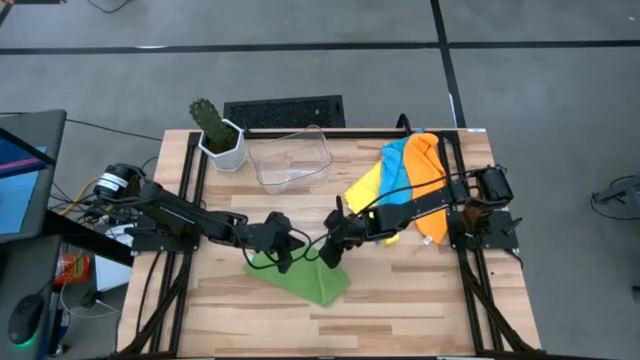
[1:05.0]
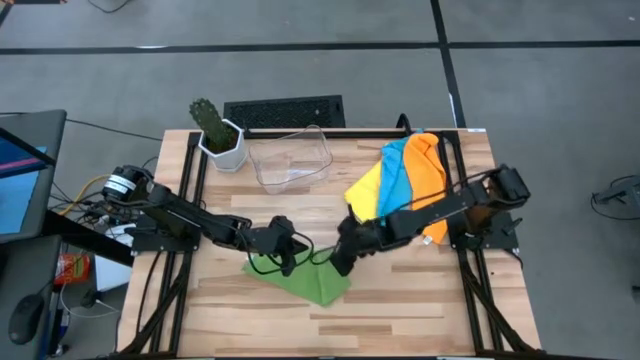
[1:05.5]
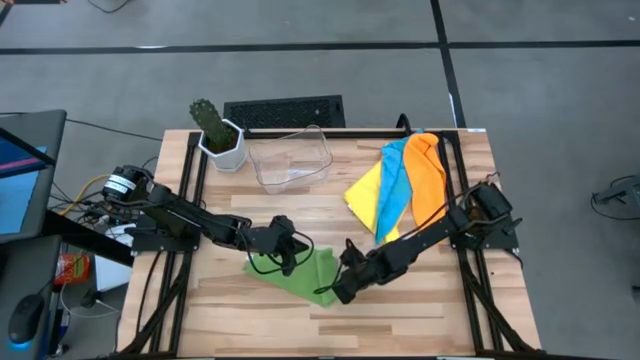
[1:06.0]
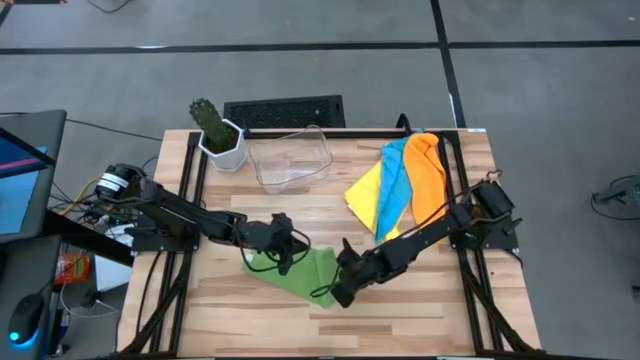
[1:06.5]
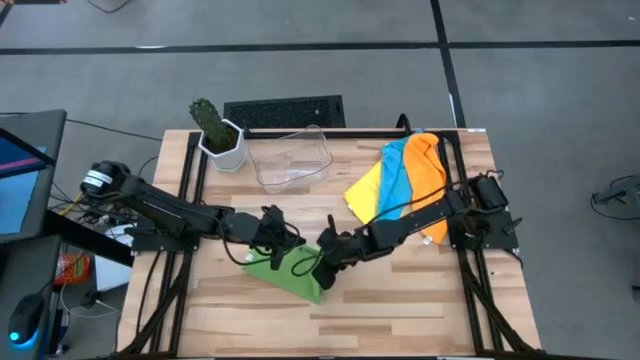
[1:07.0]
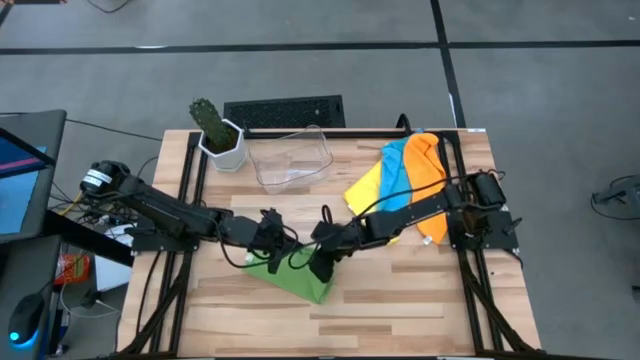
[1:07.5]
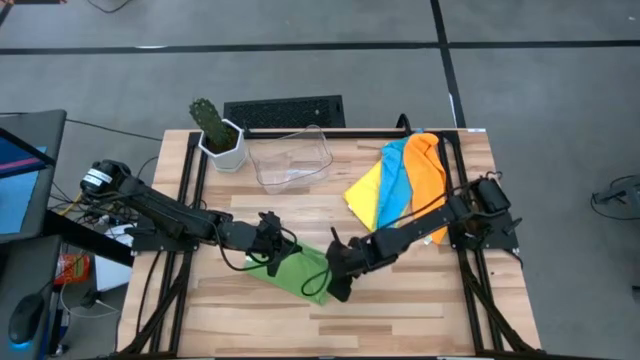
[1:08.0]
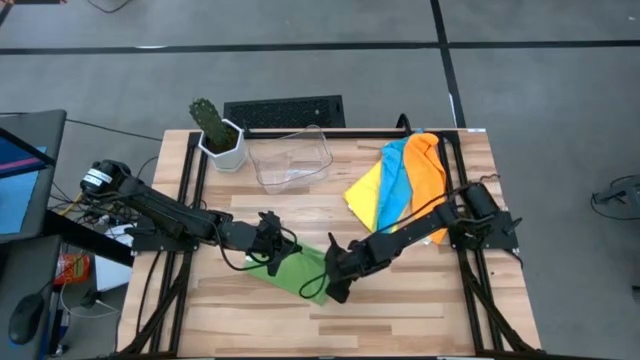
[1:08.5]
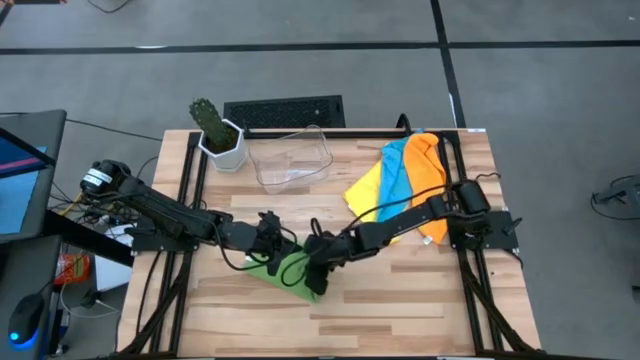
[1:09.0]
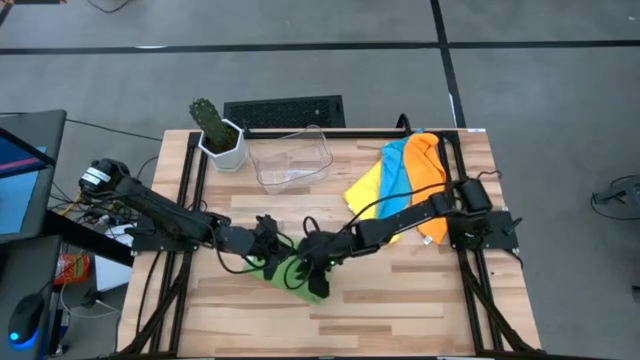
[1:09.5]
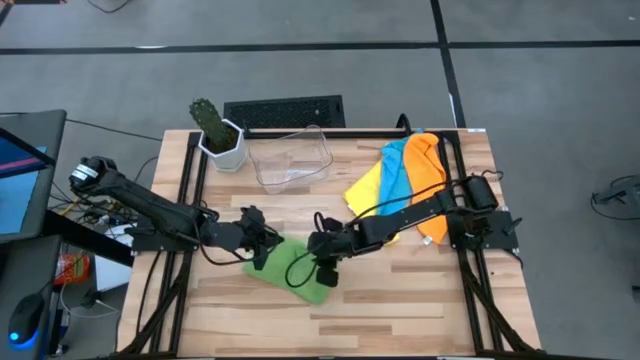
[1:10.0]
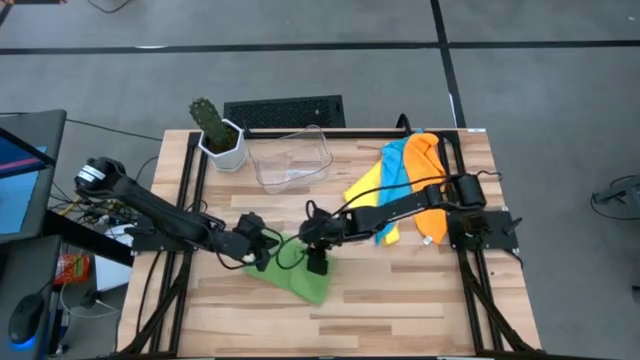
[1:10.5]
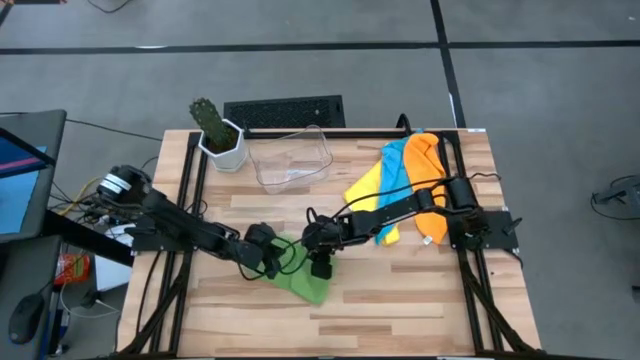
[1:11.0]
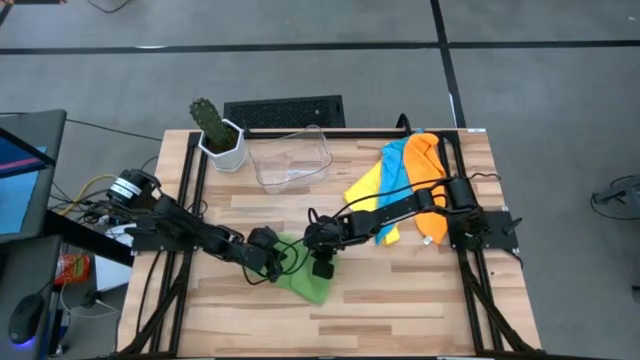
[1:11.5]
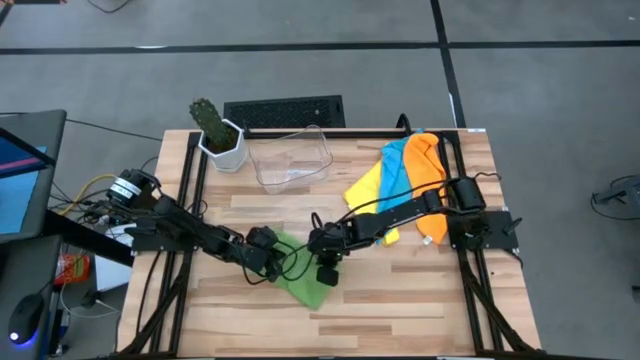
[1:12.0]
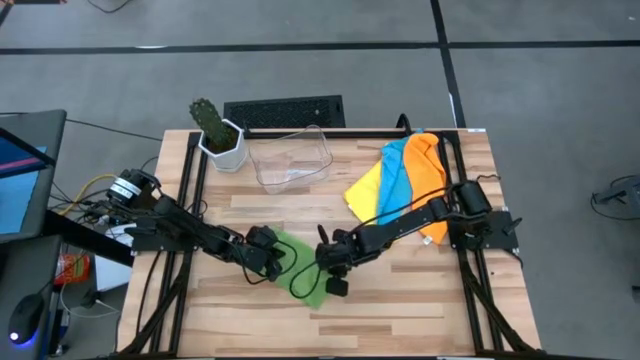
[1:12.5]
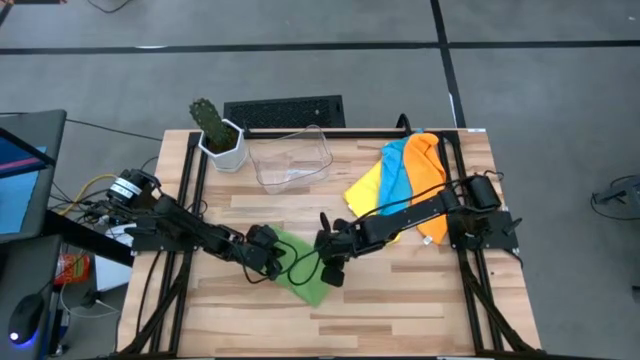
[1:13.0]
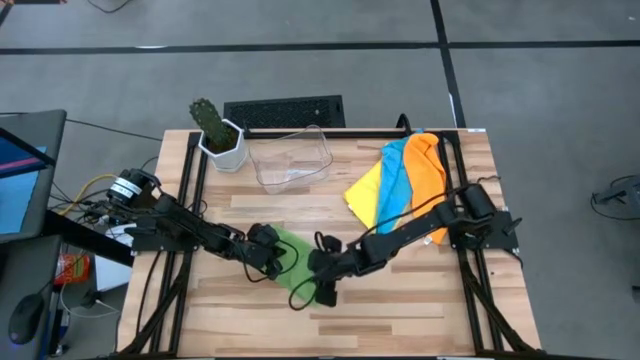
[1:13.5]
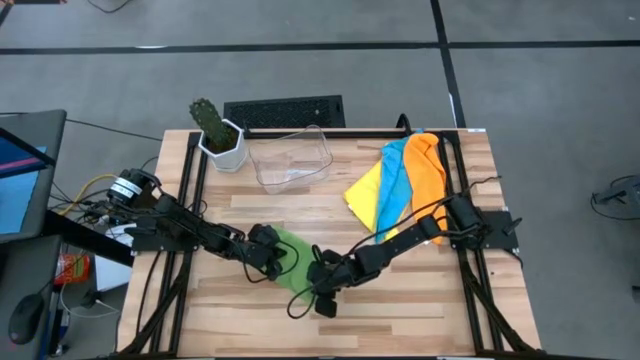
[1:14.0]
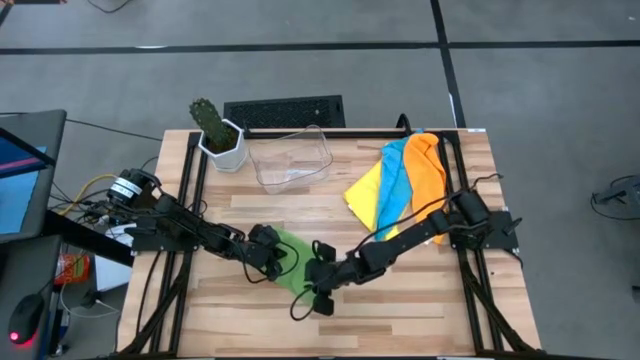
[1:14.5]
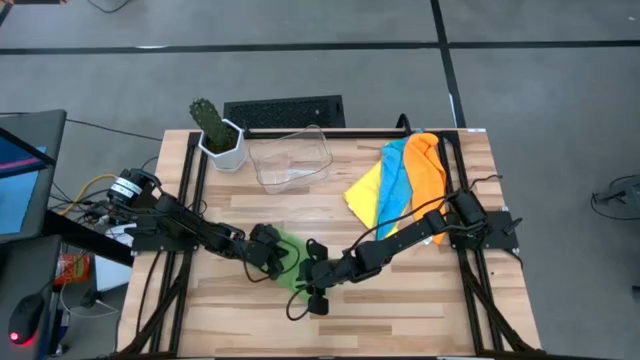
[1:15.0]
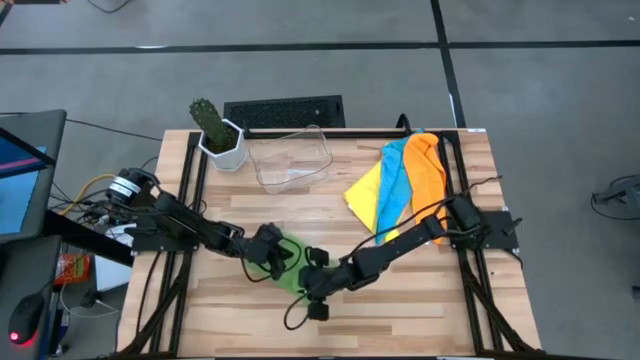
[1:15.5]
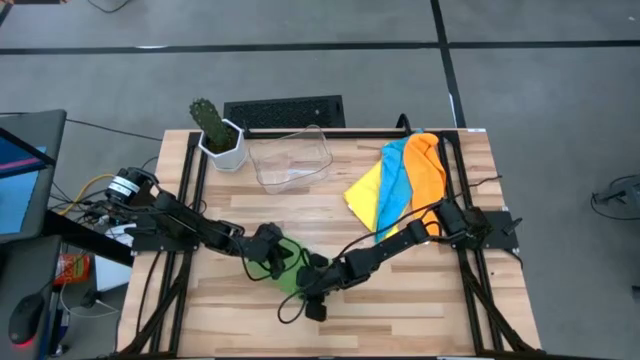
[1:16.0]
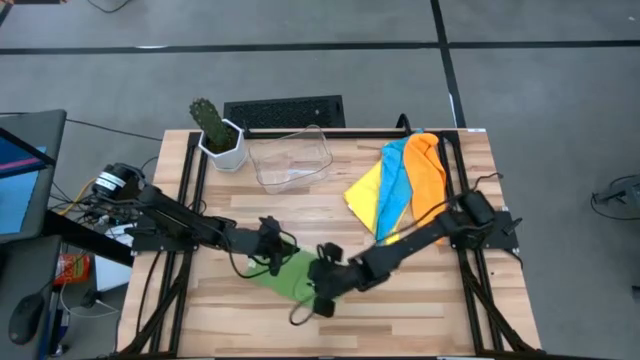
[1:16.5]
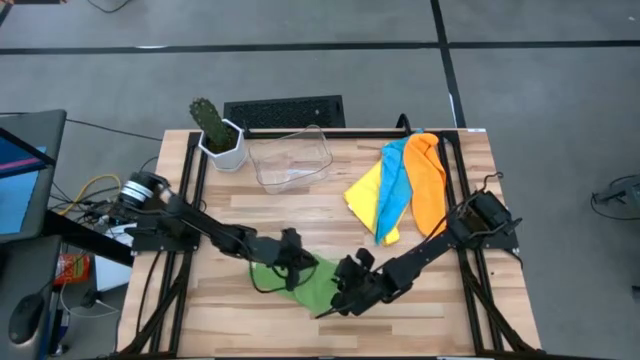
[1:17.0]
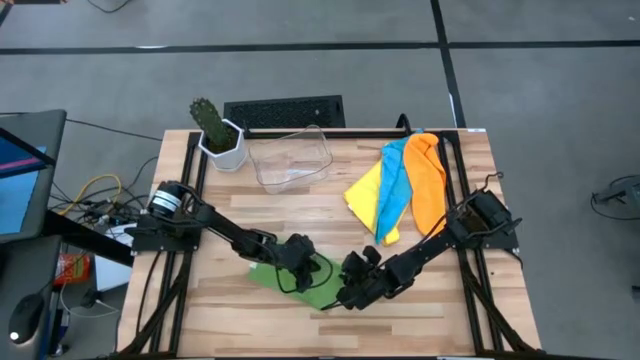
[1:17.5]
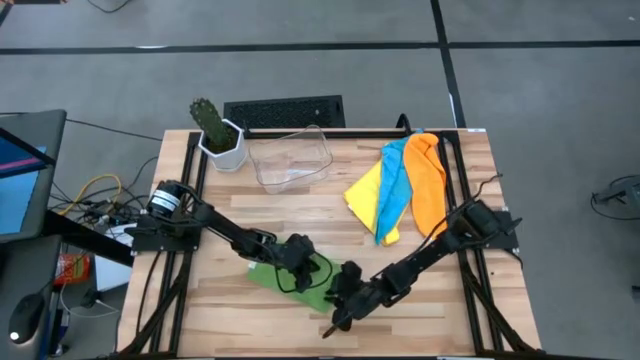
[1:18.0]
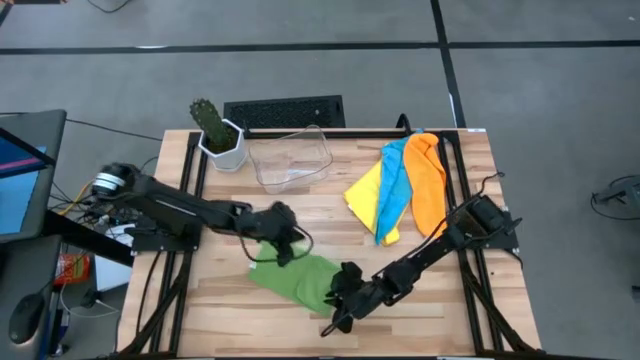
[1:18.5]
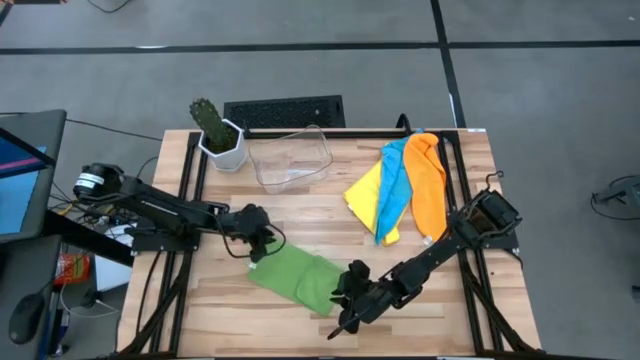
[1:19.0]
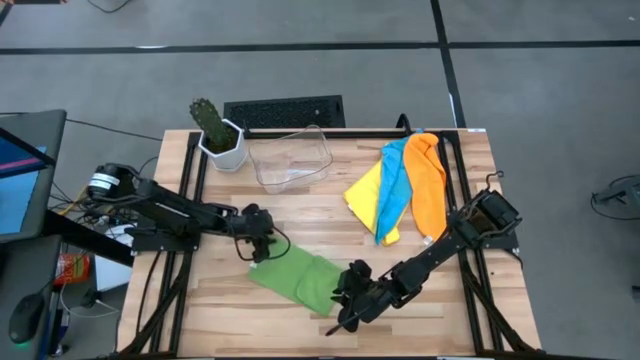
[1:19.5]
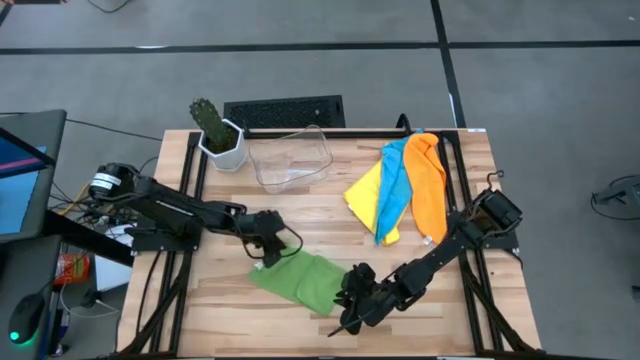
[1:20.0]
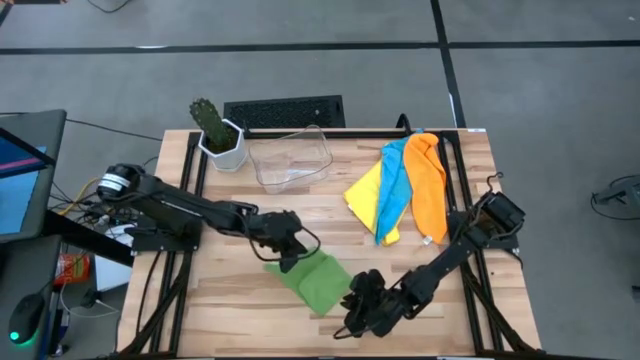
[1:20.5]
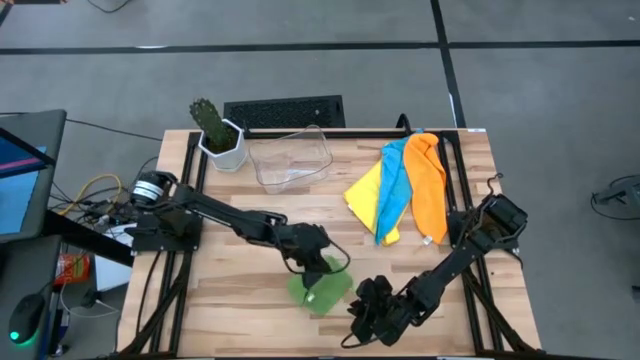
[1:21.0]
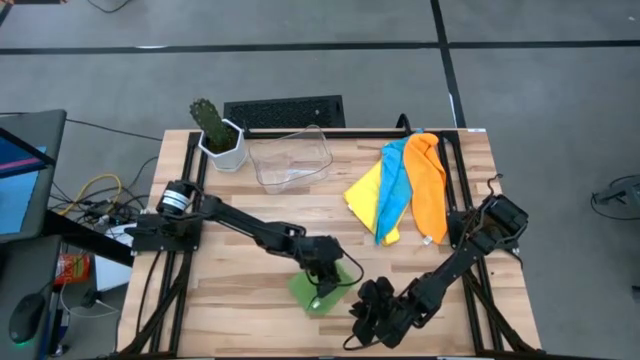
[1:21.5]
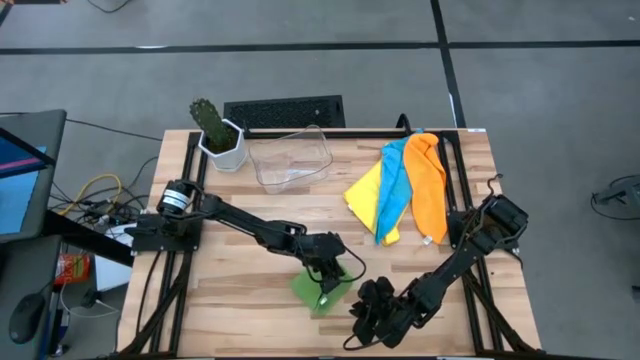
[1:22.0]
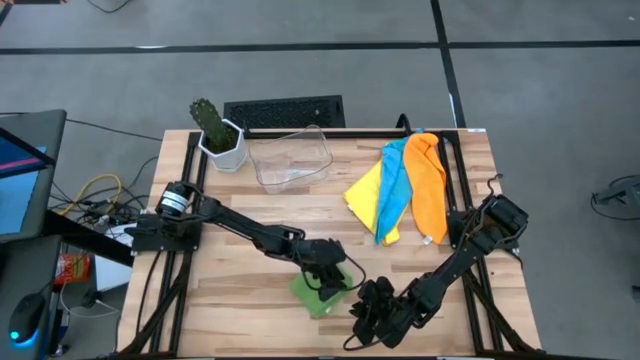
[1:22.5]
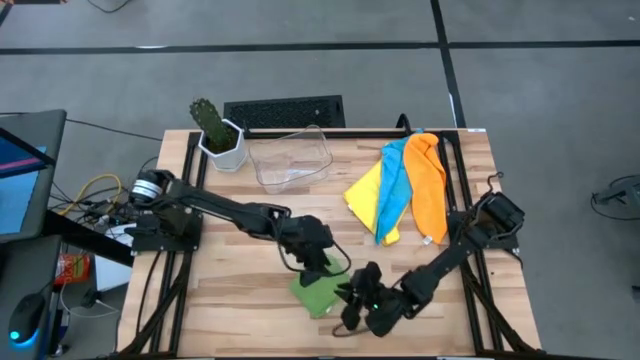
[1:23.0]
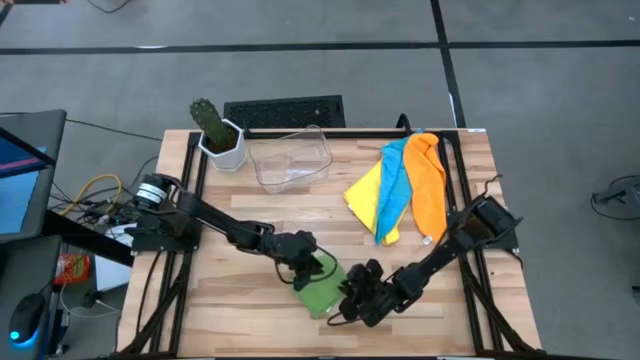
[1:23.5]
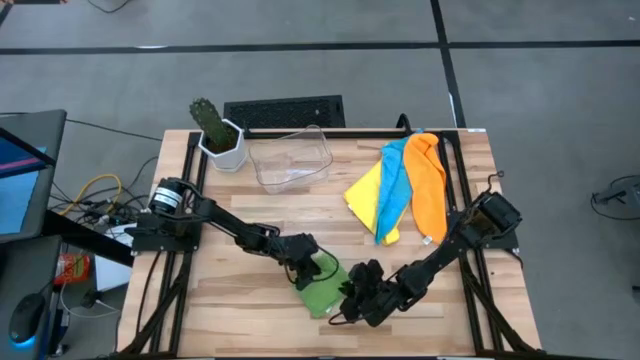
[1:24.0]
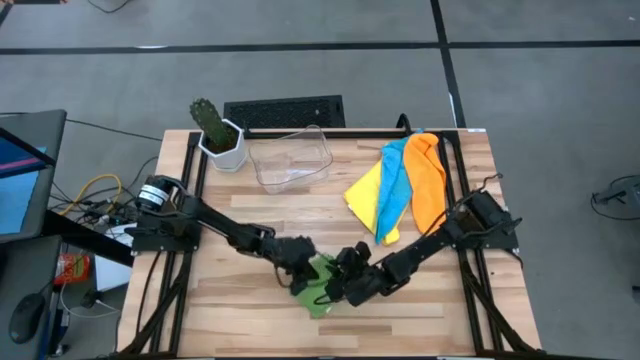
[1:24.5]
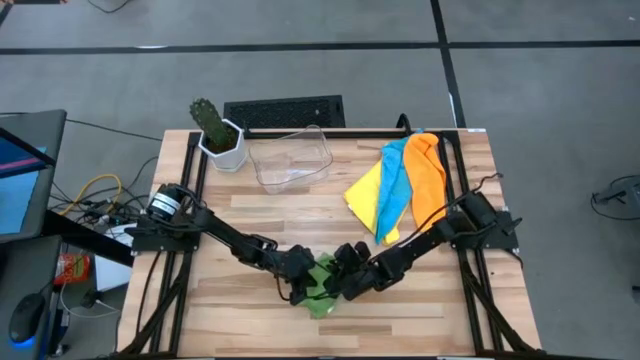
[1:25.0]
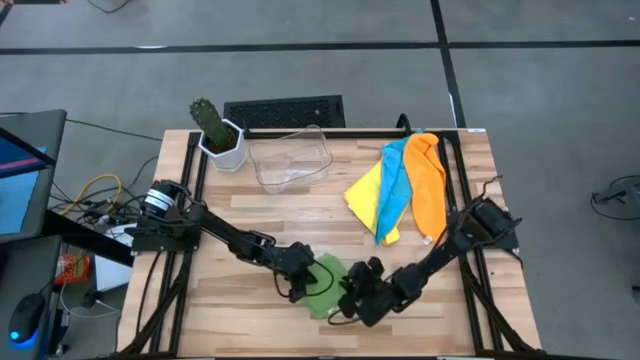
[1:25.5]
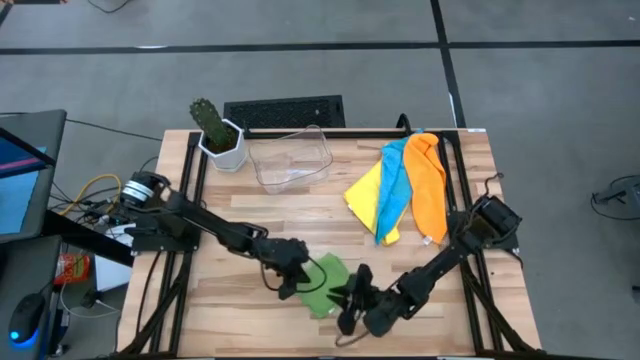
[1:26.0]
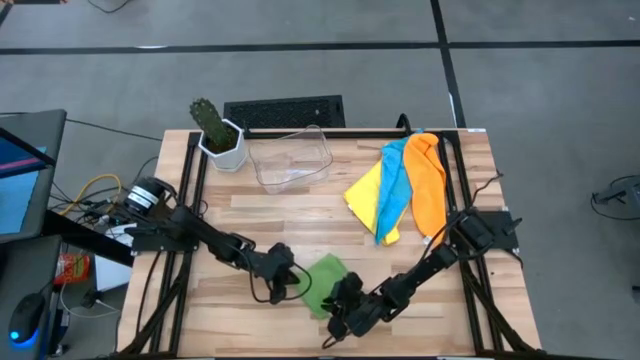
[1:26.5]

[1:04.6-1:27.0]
Task: Fold microfiber towels
Fold the green microfiber cloth

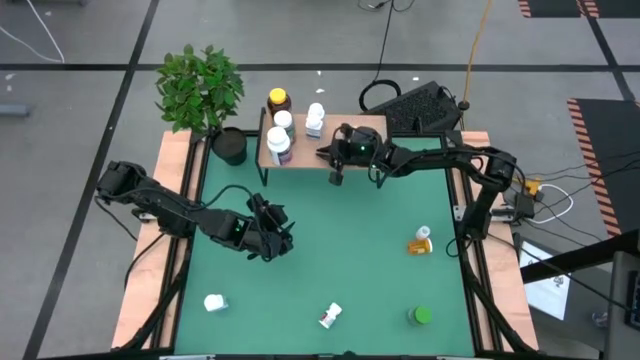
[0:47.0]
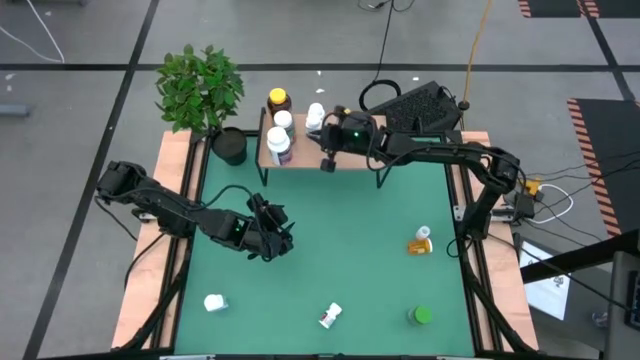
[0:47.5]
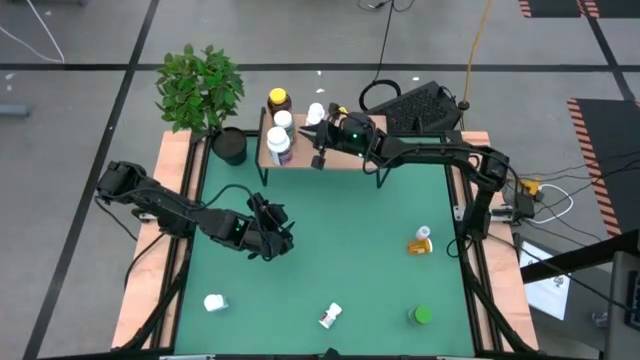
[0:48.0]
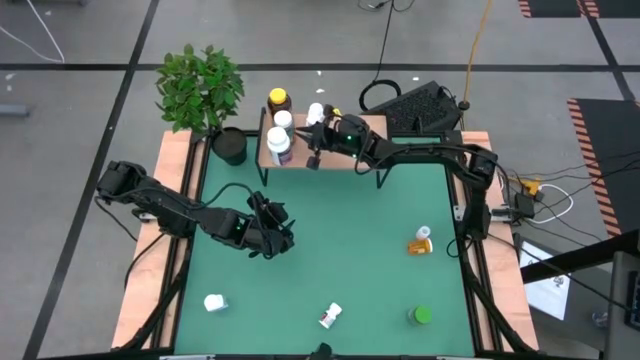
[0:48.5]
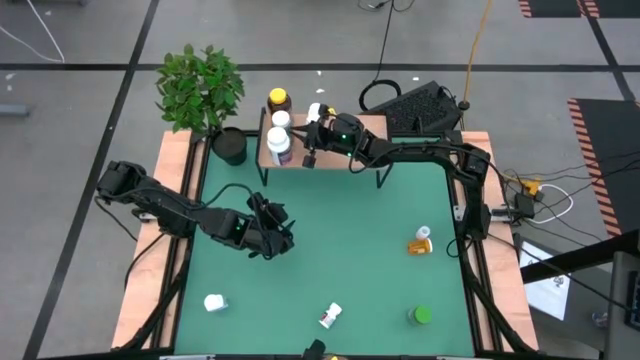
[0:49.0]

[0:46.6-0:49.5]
Task: Pick and place medicine bottles onto shelf by color
Adjust the green and orange bottle on the shelf
